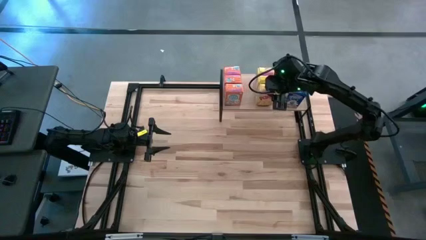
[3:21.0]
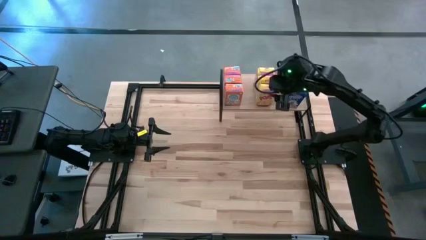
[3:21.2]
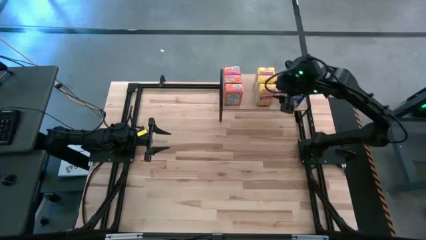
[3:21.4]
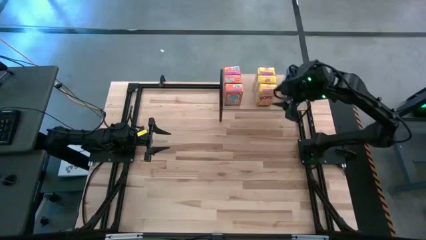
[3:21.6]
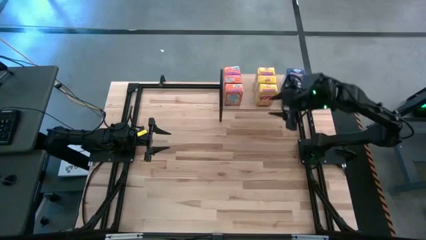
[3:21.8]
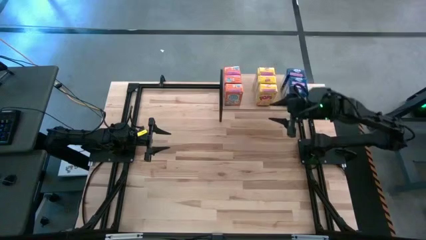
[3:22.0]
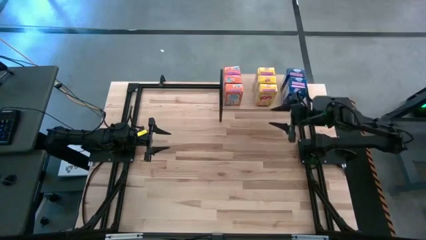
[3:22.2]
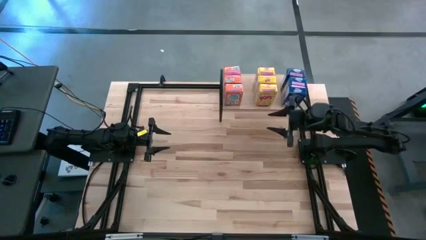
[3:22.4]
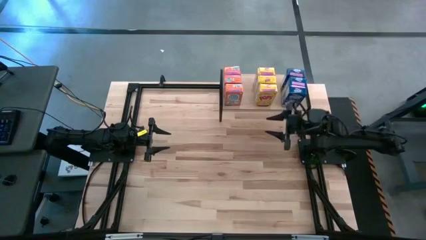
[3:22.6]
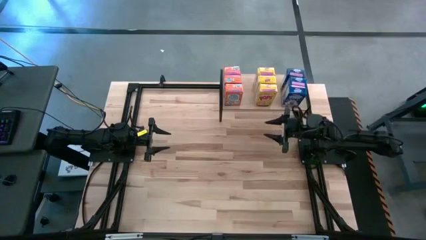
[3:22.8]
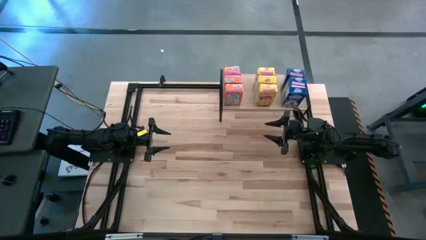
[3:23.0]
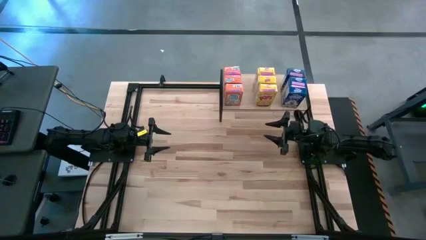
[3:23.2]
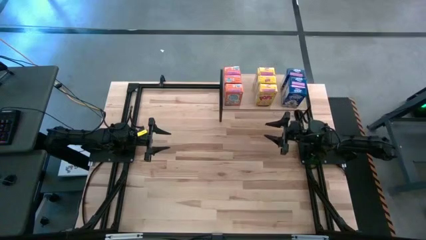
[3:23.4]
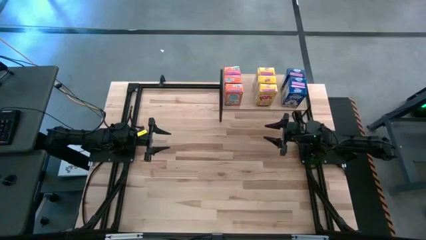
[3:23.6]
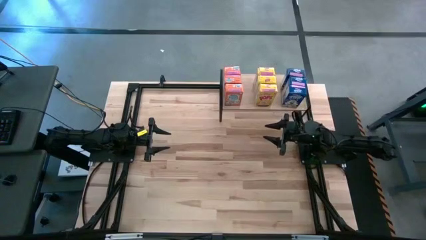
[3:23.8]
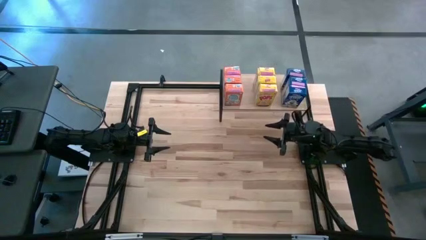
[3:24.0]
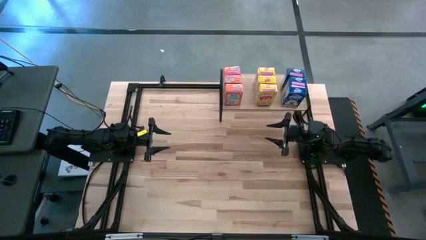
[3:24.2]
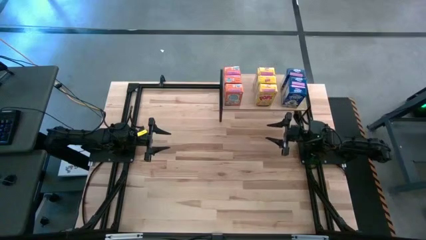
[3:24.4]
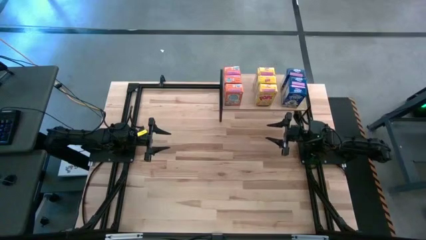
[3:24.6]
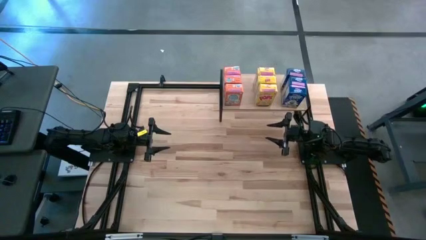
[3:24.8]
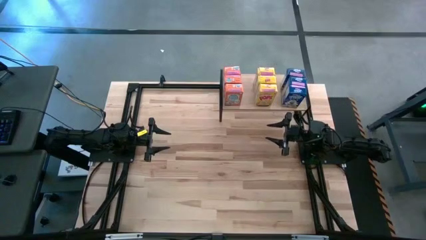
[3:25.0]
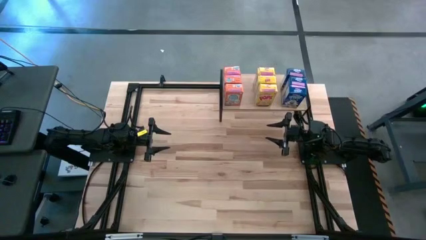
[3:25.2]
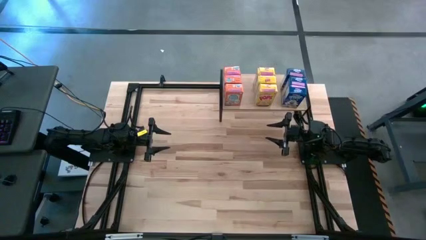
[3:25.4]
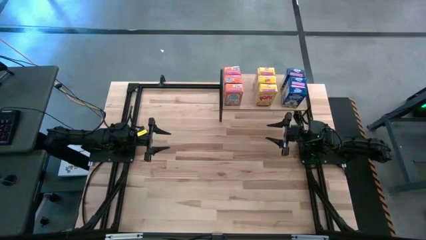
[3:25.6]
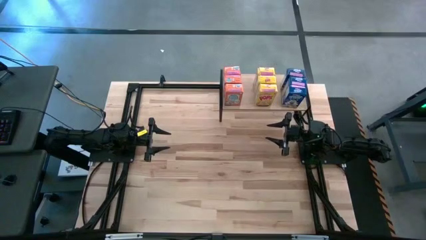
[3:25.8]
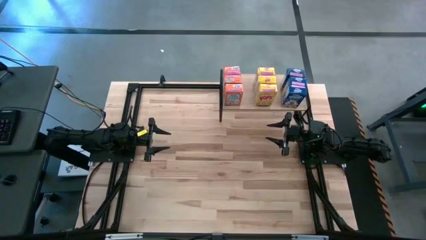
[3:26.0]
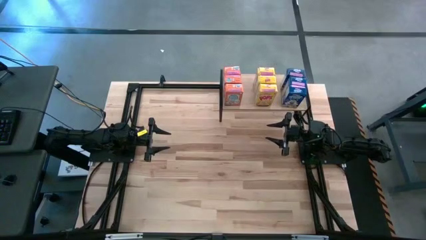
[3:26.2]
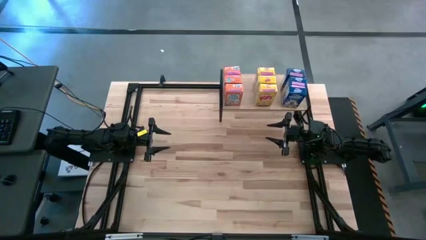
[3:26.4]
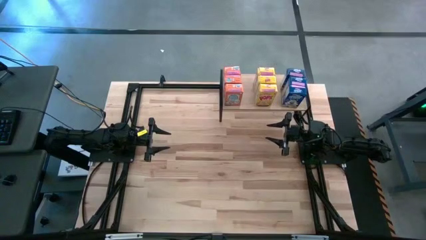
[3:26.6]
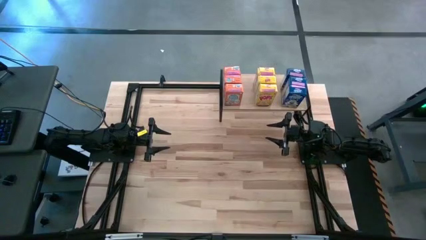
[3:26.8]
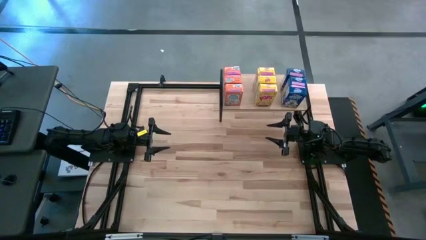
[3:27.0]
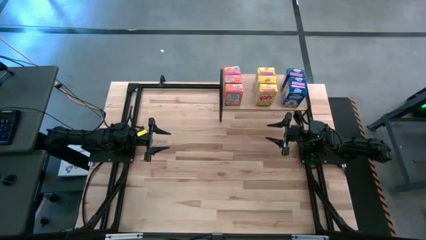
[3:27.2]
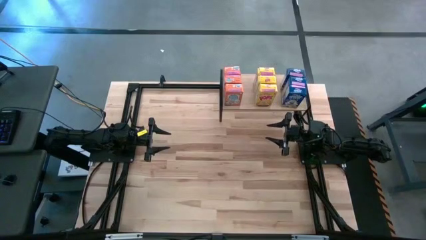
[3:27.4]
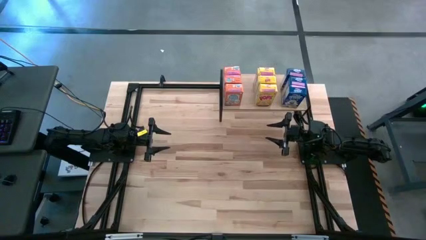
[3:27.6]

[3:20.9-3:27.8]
Task: Stack cereal on shelf
Return to Home Position

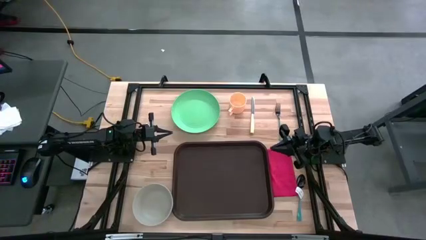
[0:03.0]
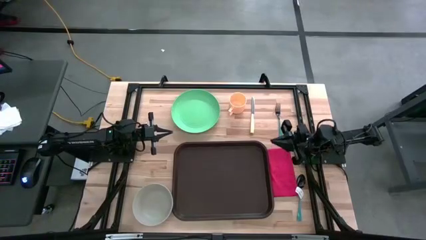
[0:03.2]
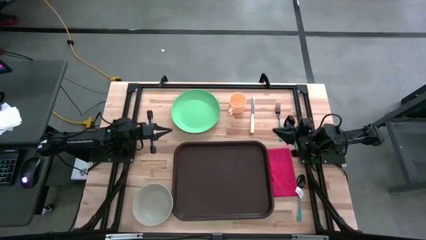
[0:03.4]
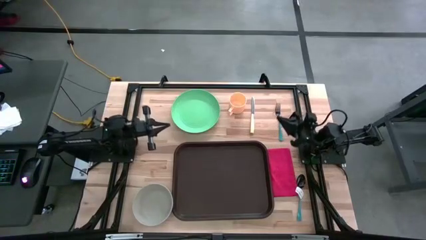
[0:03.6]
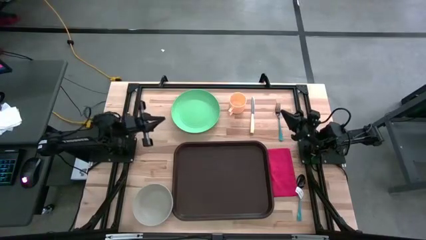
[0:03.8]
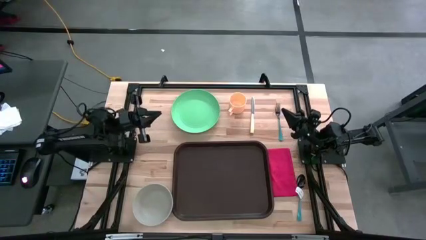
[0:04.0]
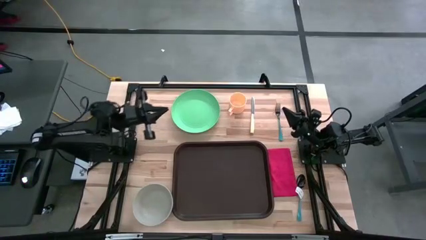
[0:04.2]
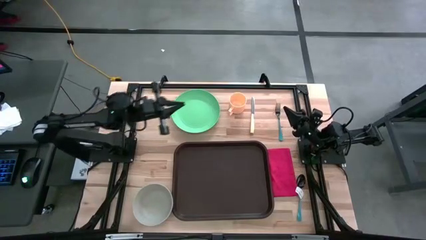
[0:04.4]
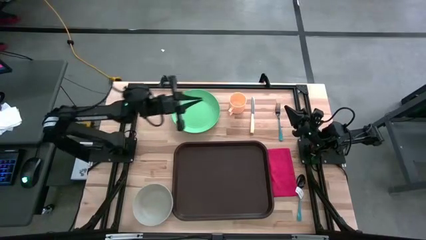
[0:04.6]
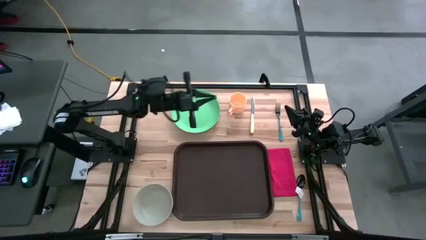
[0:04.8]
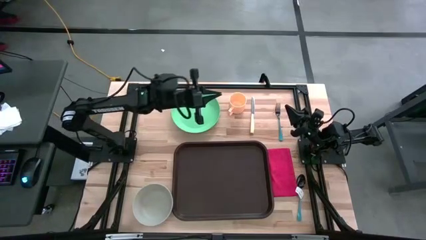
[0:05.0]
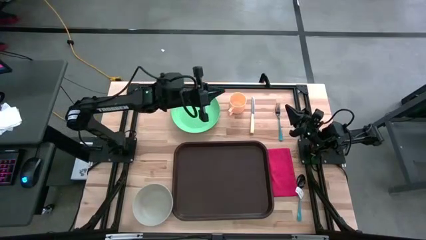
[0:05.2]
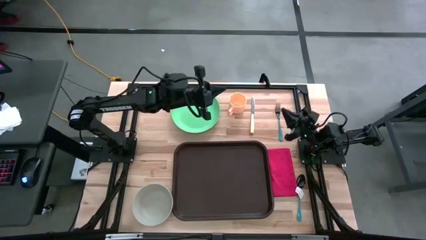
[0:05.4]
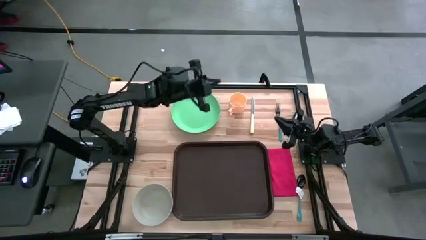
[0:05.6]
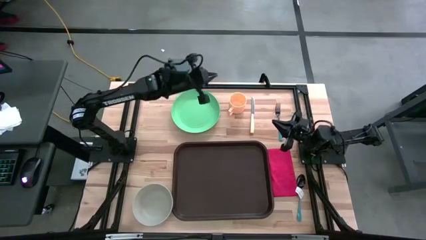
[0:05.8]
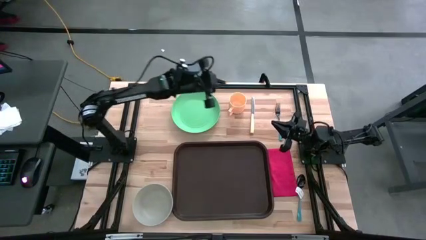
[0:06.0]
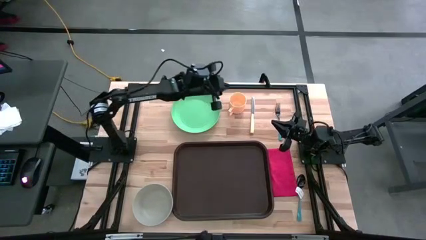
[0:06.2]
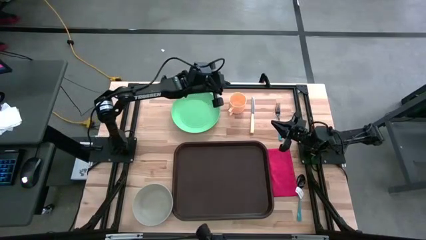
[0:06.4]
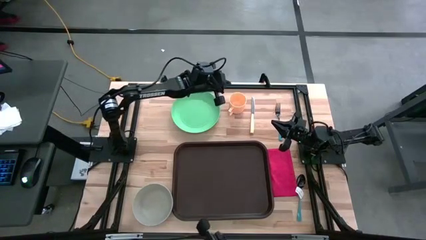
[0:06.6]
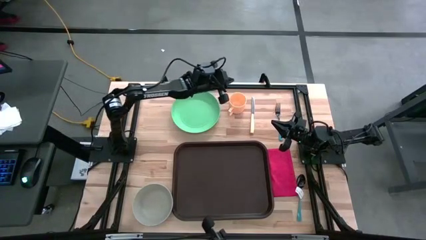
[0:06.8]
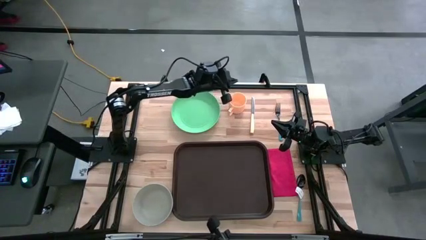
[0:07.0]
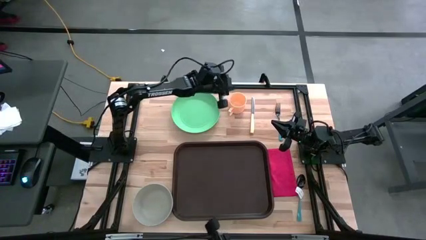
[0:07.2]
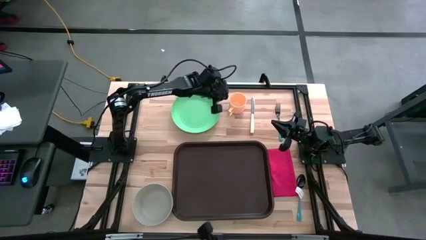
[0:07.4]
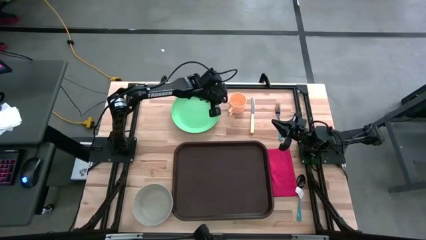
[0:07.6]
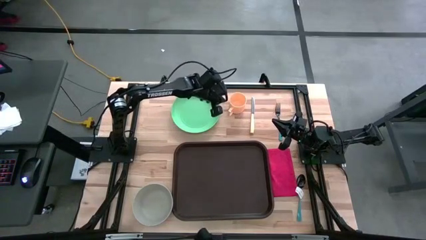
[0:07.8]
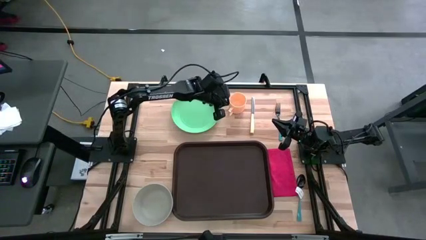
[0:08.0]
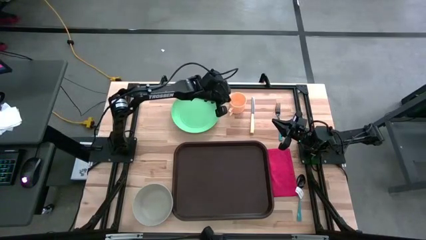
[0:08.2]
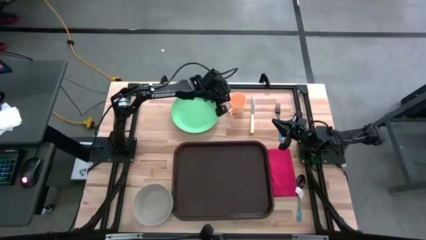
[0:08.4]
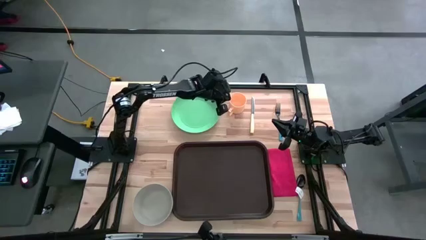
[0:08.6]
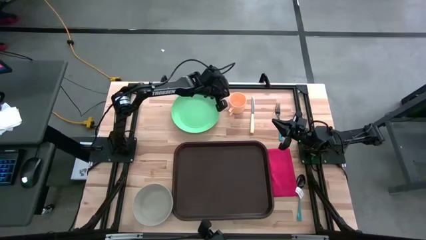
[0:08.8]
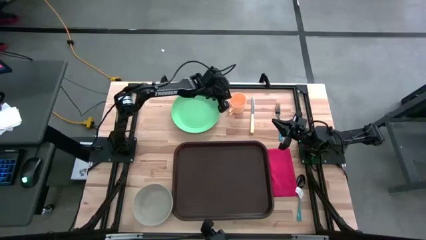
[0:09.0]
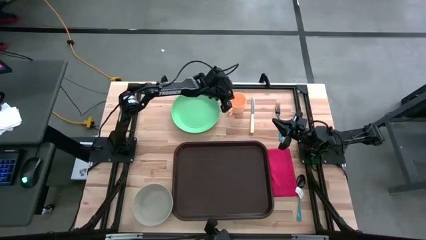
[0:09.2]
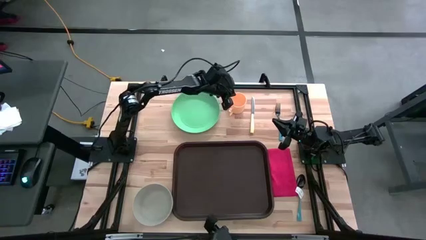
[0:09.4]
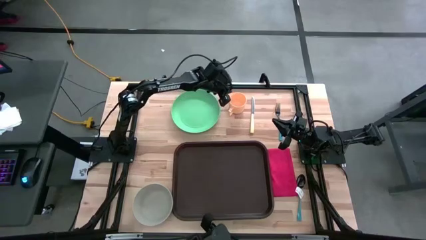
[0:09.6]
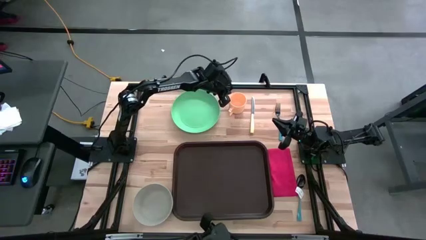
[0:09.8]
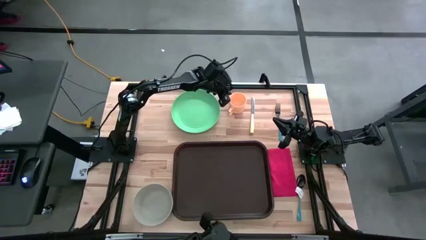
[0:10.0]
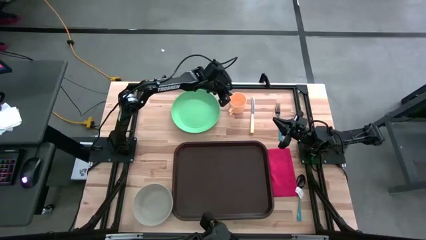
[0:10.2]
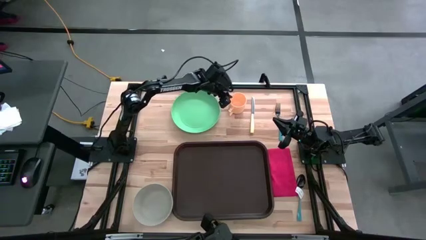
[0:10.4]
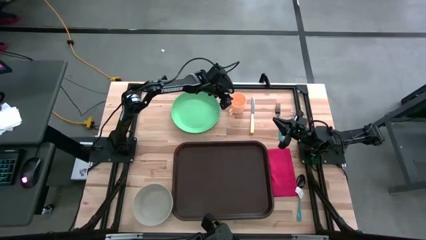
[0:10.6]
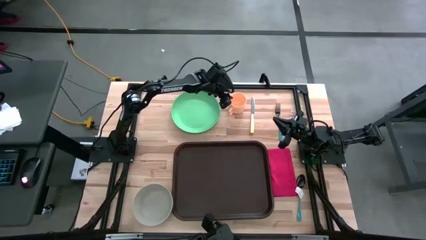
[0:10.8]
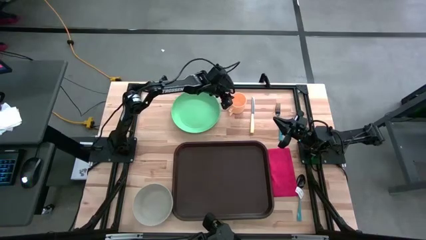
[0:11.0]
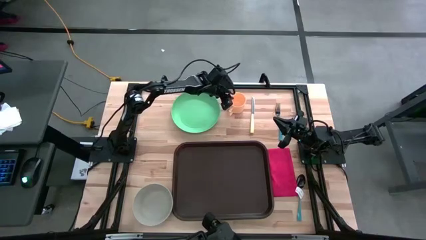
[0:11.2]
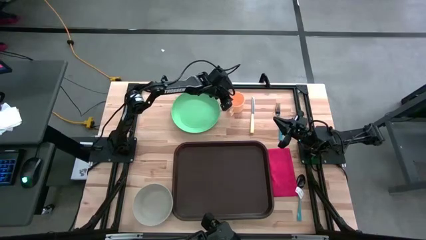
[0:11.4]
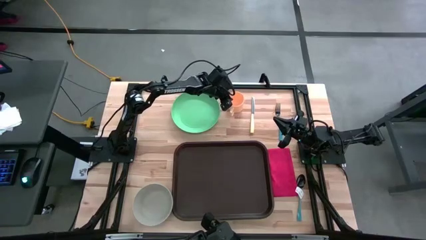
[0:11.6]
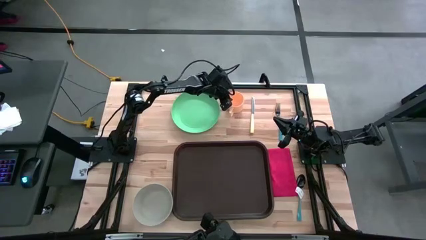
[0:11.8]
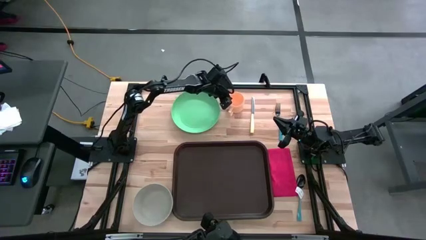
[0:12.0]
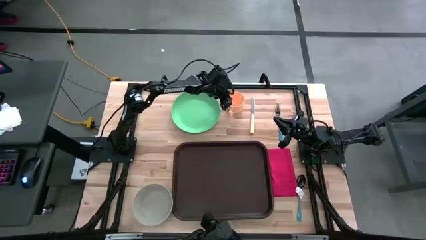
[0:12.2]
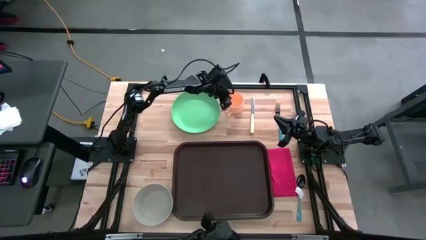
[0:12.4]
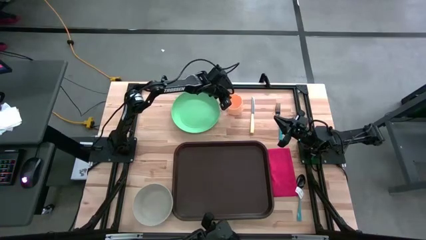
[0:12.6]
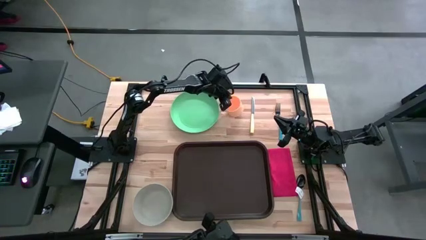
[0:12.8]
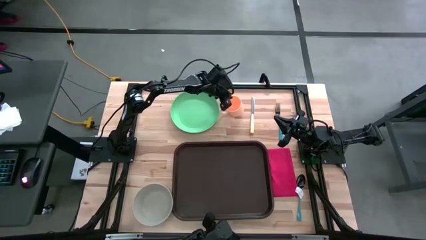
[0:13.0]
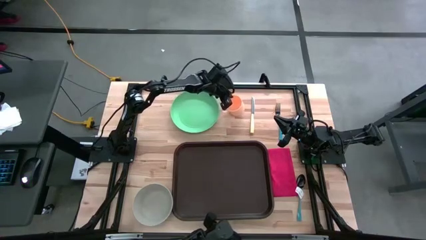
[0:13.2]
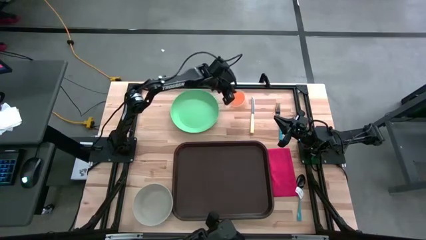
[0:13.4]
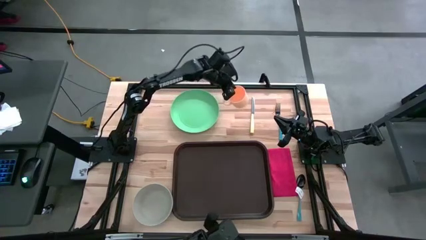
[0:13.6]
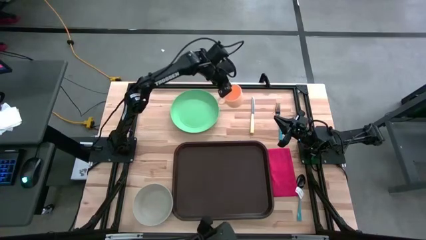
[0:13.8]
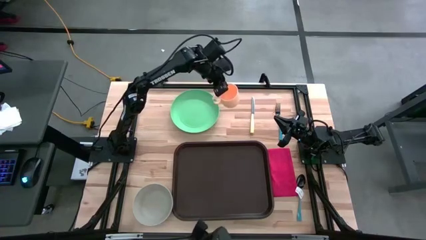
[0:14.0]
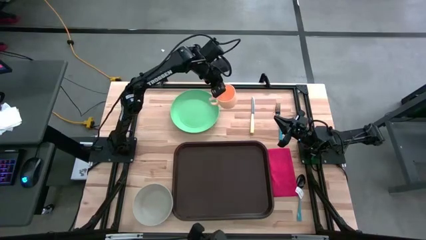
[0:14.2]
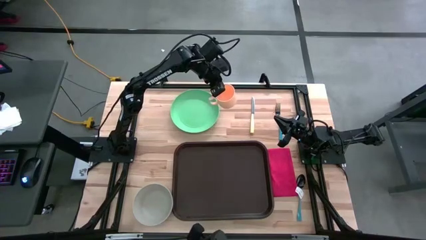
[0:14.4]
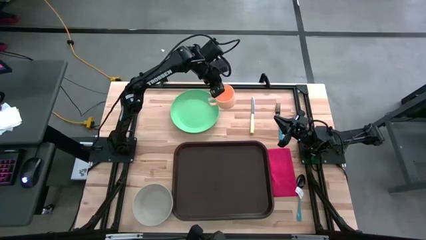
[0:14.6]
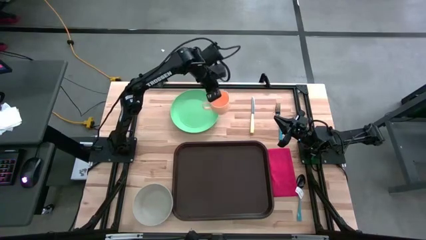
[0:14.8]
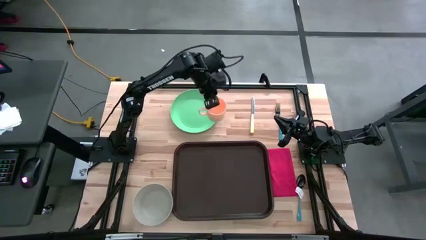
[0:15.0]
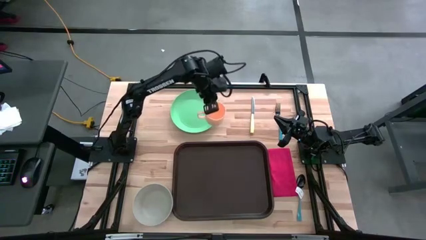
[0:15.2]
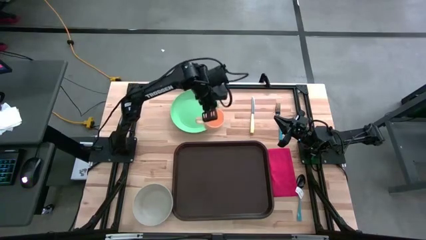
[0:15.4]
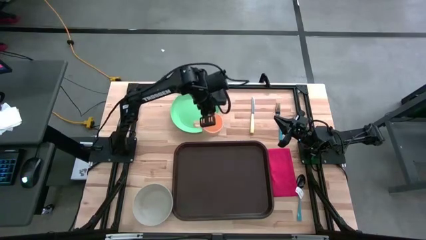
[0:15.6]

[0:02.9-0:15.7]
Task: Set up tray
Put the orange mug on the brown serving tray
